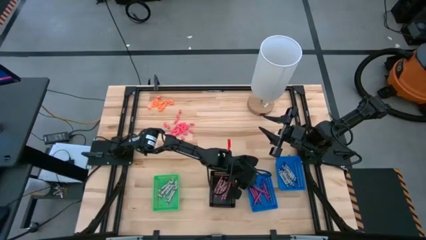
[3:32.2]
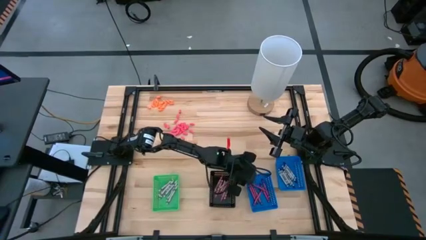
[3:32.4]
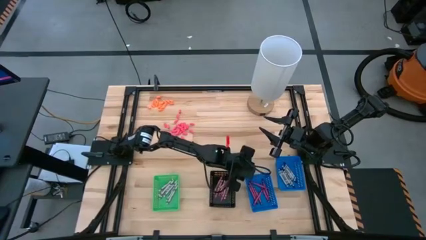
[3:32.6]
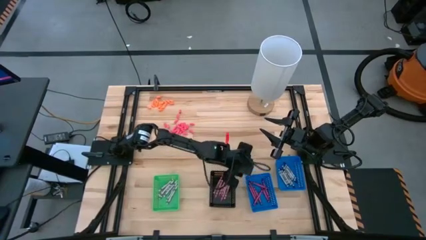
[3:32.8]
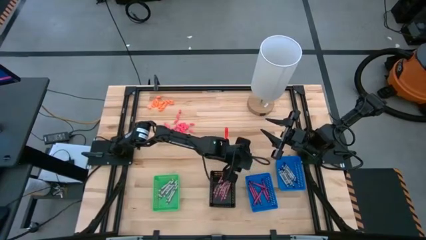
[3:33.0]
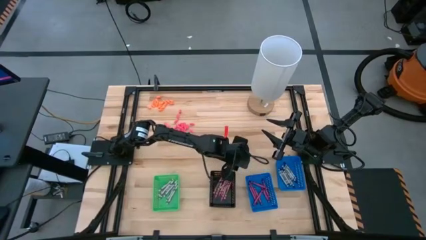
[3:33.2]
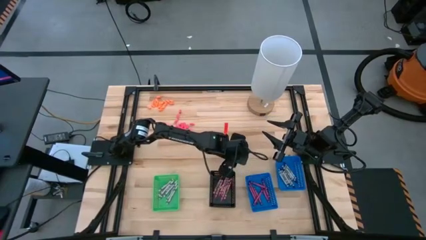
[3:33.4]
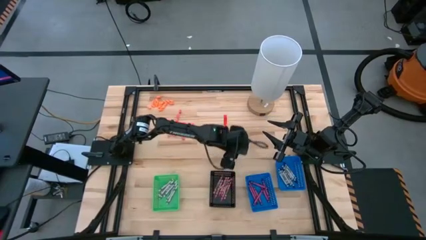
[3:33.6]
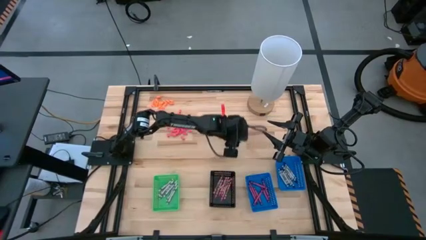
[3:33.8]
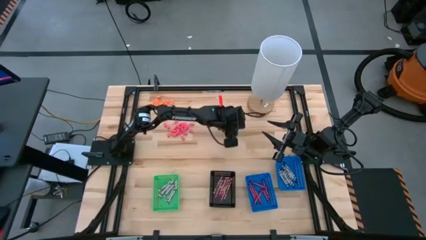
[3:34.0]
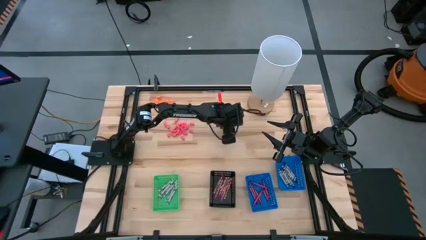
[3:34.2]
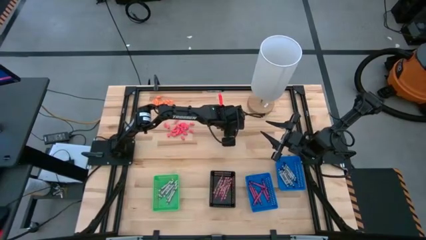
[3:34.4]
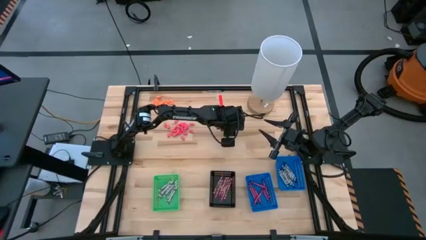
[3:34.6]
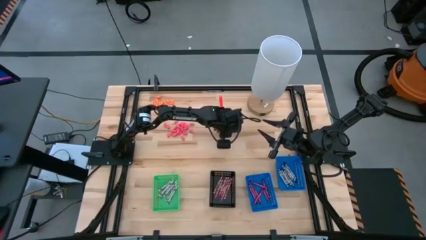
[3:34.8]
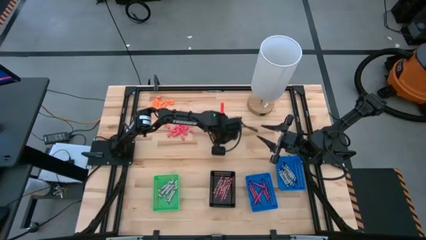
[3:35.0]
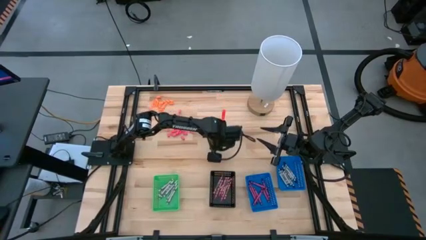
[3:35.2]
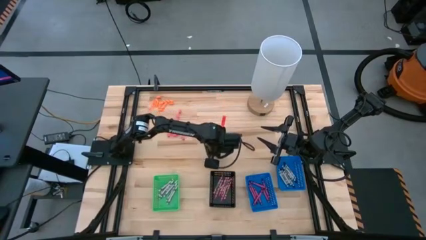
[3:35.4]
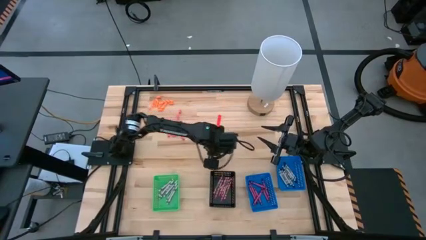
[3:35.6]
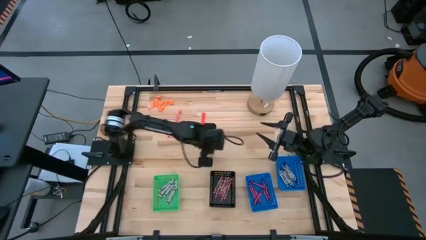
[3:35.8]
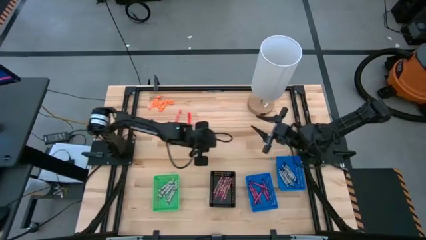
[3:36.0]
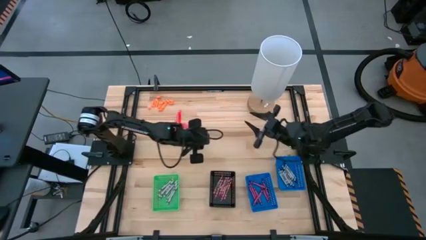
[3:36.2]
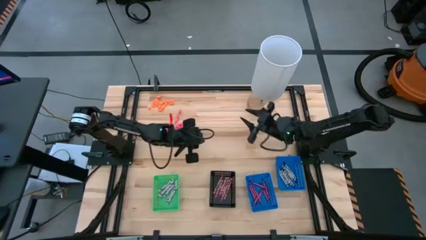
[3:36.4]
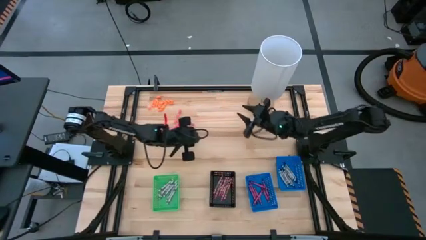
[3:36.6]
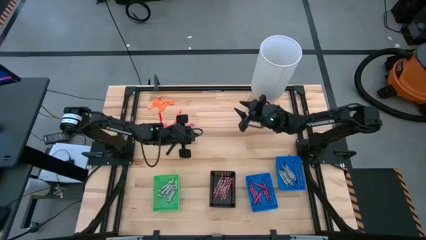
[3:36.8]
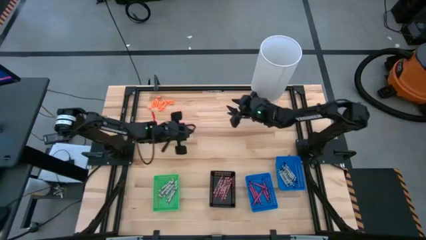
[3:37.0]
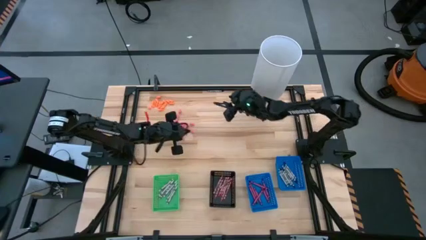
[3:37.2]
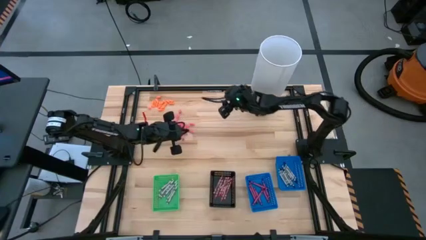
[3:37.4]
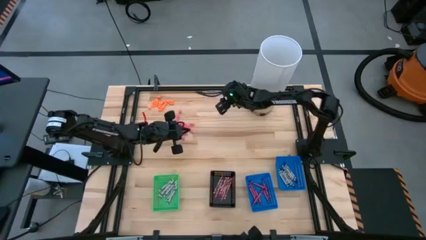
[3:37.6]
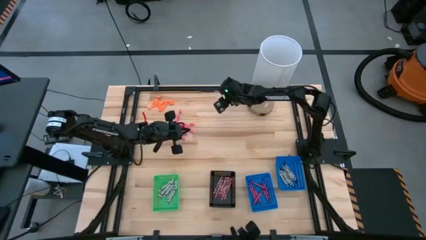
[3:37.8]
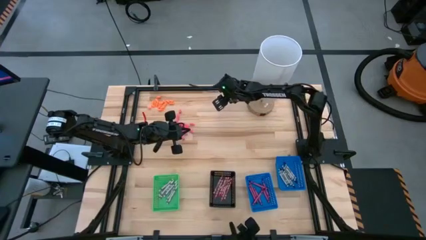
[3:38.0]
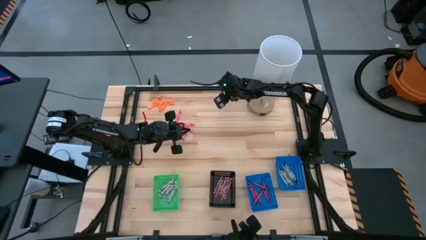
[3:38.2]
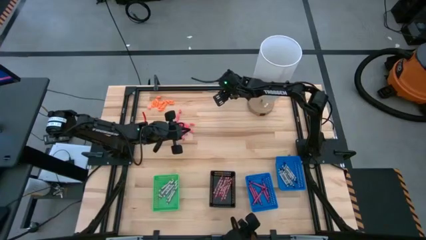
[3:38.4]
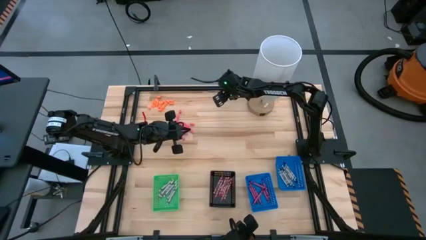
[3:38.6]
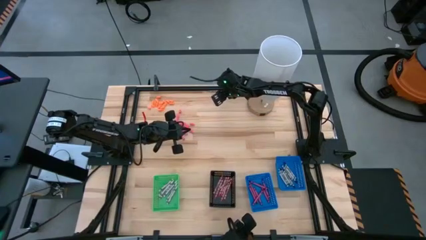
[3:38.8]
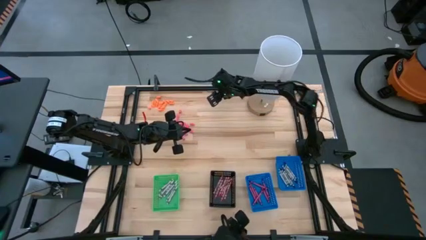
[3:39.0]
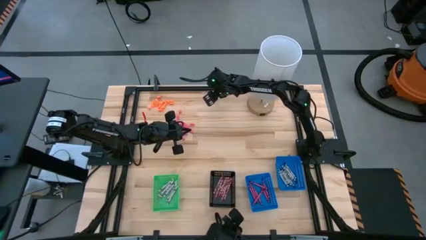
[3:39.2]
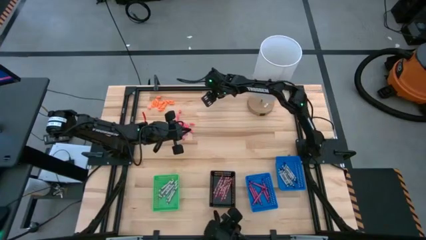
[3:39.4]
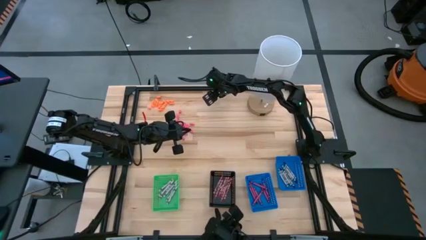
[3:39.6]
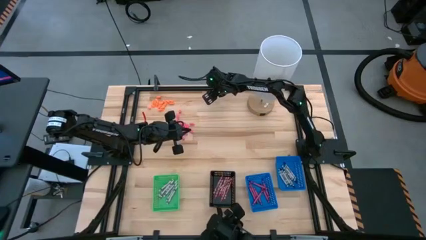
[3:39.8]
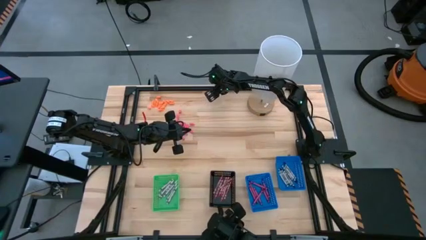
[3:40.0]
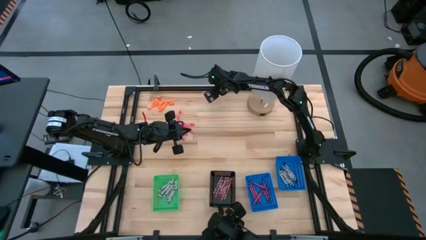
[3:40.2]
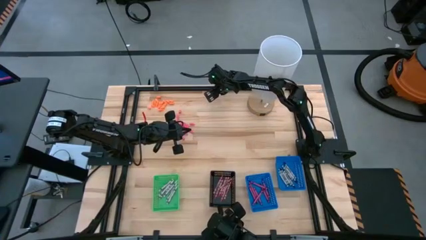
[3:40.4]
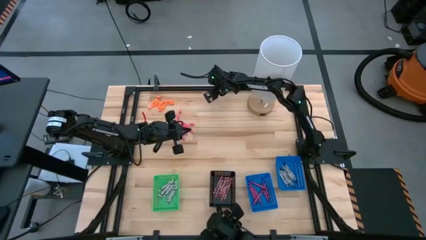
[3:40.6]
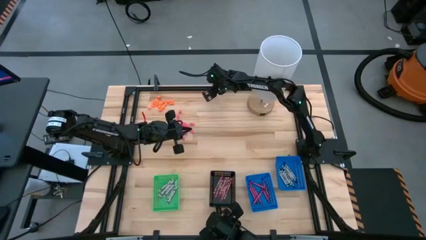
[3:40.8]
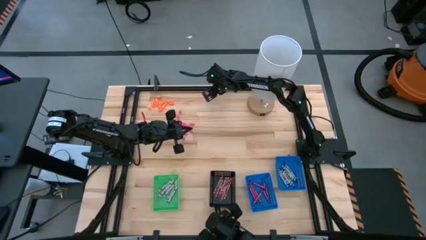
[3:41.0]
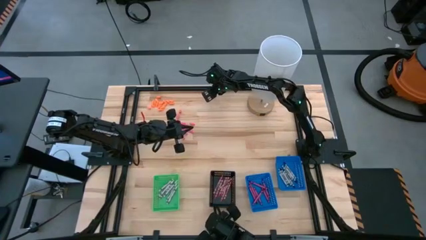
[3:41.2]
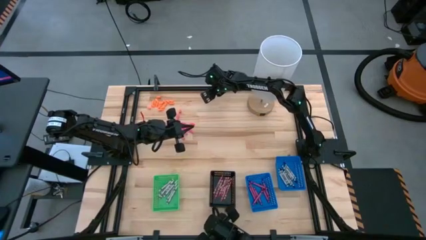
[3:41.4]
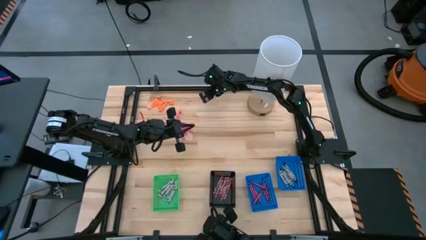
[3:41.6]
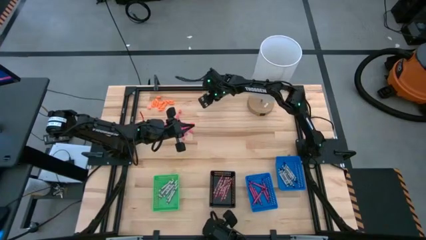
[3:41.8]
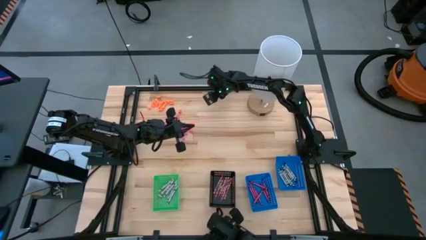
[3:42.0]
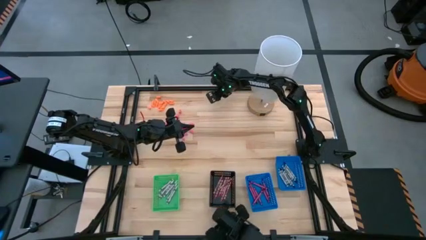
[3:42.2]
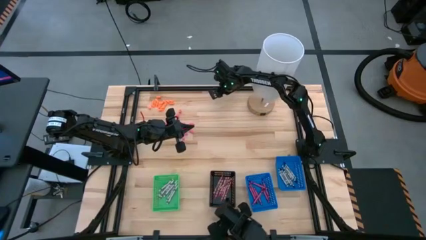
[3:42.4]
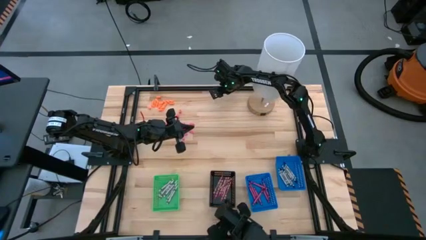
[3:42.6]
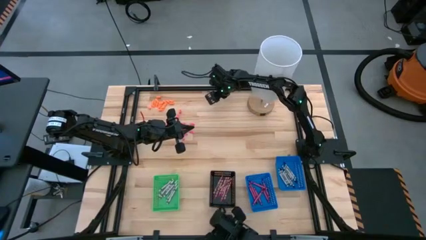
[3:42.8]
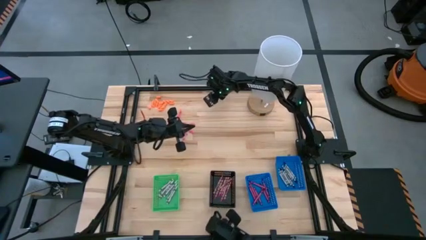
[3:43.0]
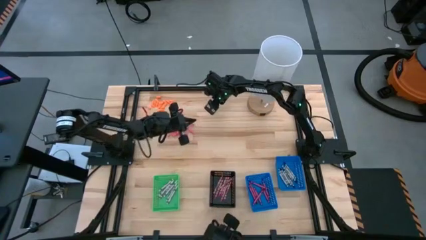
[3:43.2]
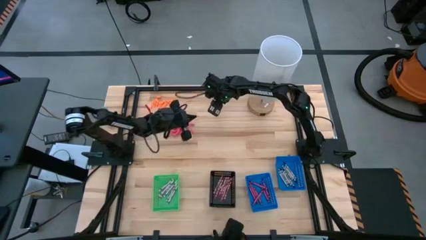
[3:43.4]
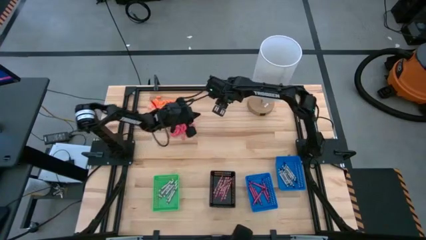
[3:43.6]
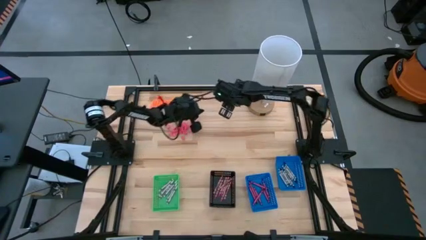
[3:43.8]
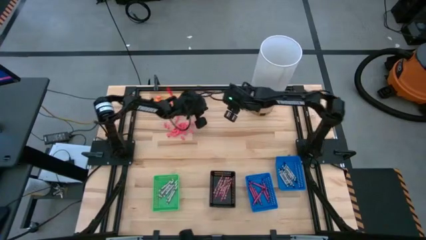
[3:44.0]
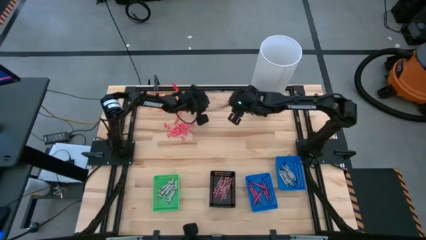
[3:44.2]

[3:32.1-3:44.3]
Task: Sort crayons
Put the black crayon into the right blue bin

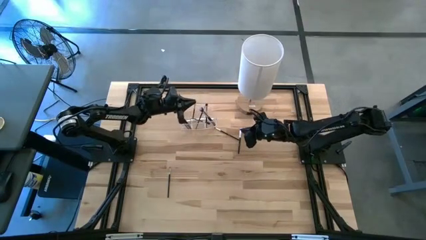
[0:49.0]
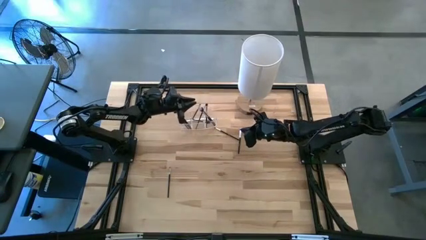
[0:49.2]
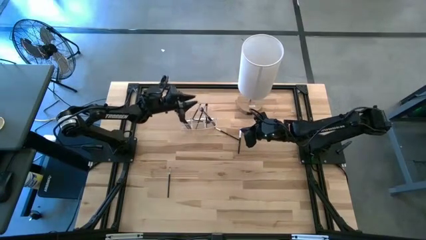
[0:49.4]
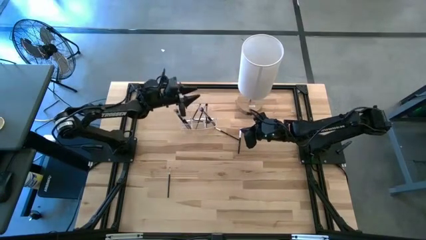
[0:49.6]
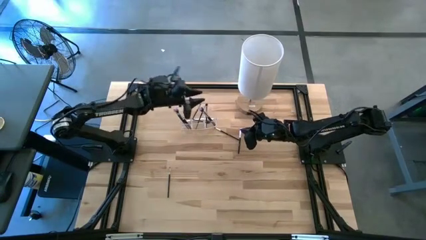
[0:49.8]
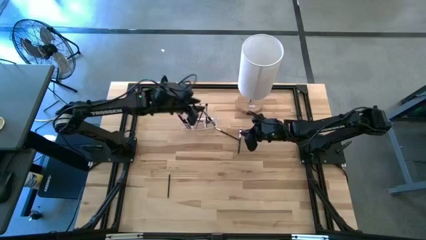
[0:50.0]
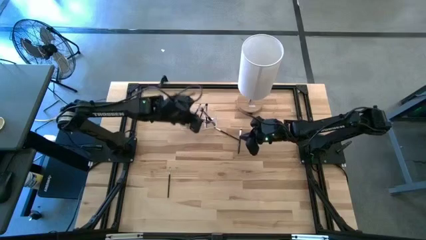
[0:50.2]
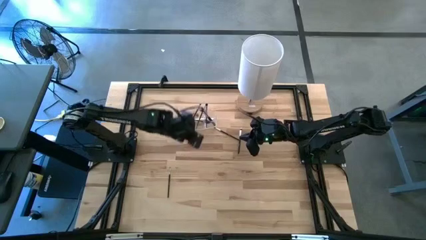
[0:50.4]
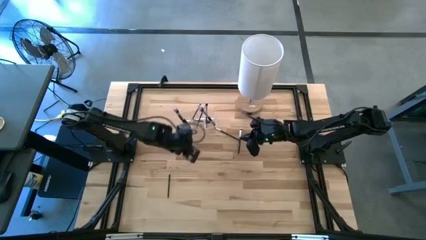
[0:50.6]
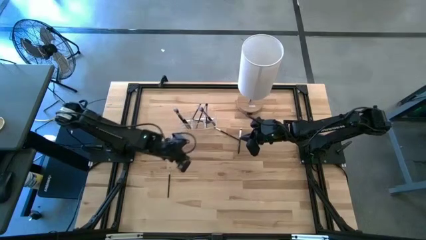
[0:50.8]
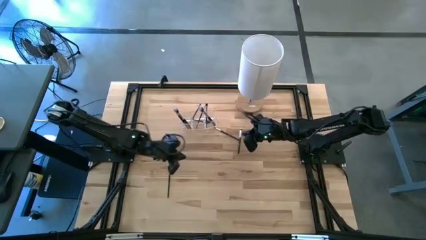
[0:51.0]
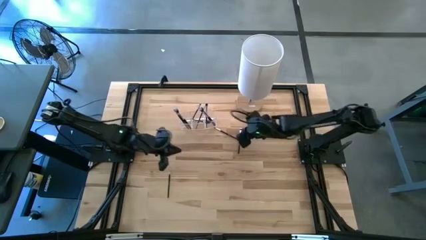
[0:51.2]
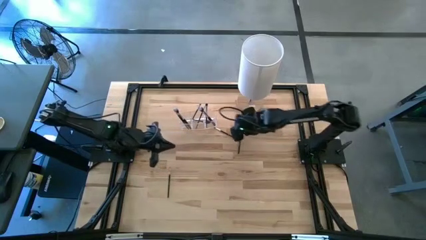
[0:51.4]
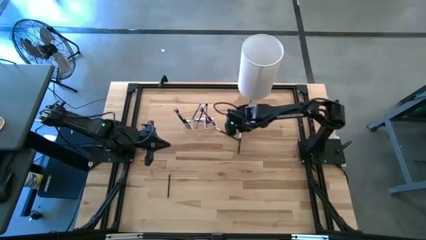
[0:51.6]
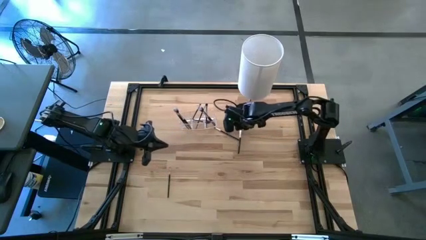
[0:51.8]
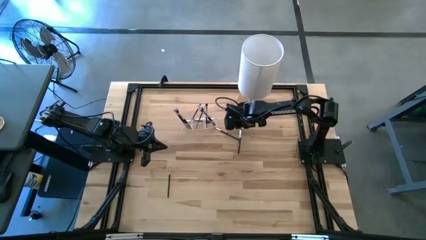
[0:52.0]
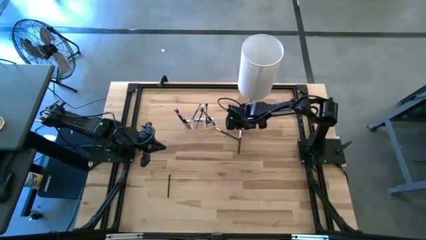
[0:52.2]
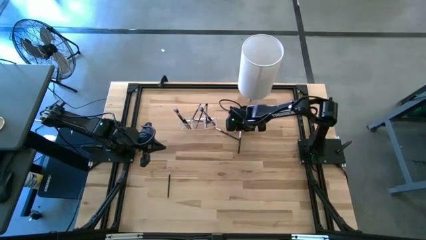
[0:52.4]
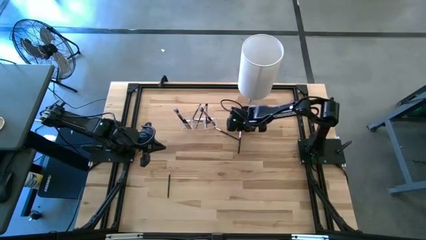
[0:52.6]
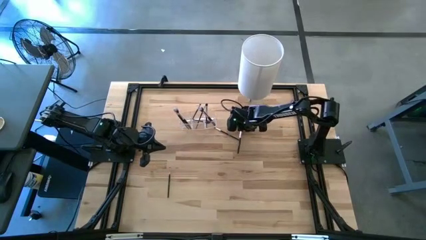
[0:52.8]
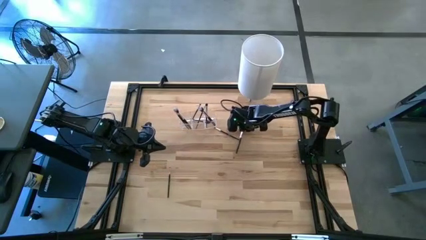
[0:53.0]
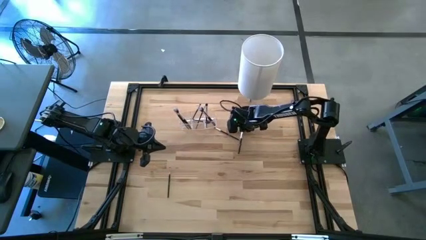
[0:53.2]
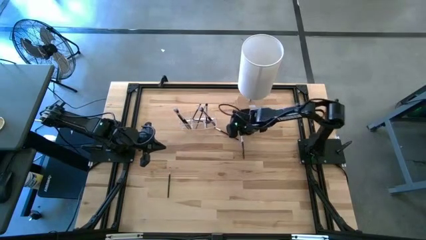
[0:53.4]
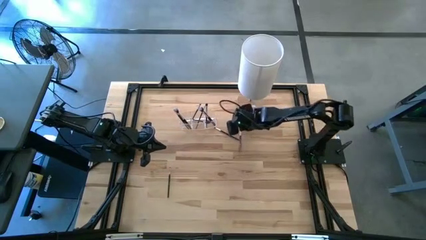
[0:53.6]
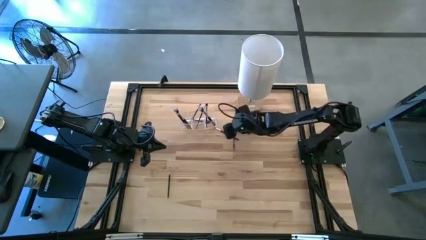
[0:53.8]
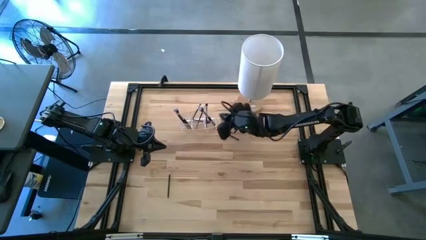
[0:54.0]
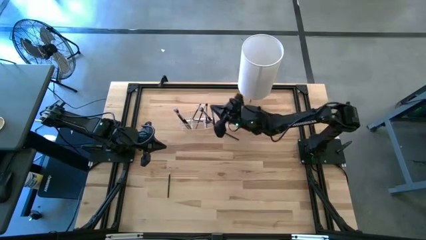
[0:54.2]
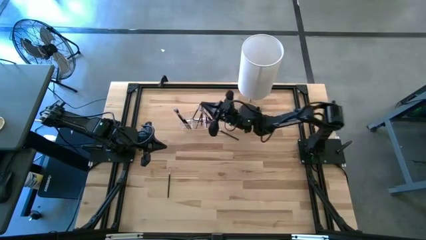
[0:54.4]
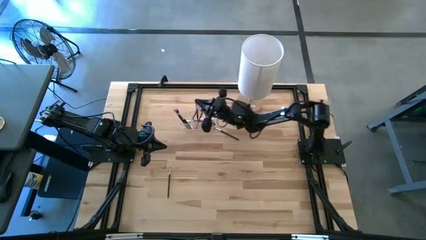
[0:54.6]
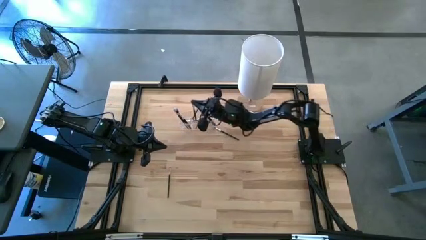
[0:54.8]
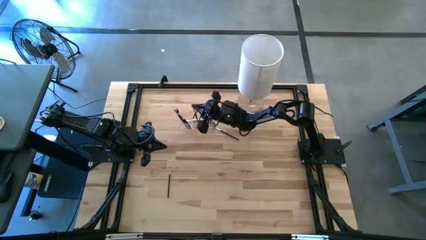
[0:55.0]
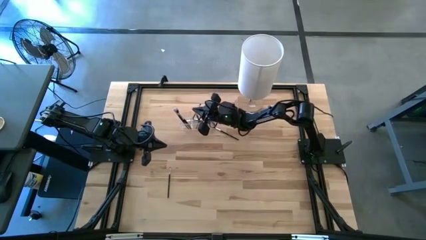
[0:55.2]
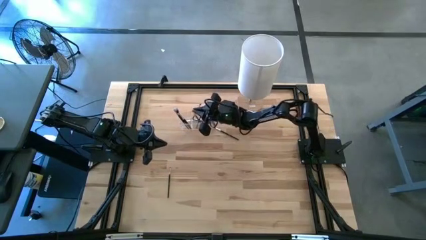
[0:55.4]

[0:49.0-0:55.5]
Task: Put items in baskets/containers
Put the black eyeshadow brush into the transparent organizer
